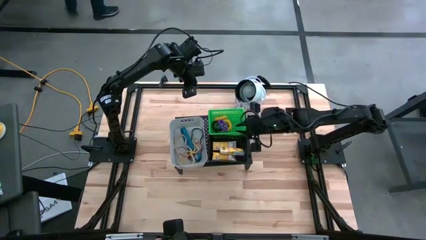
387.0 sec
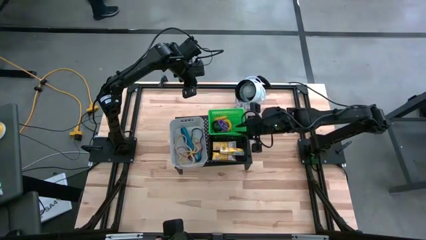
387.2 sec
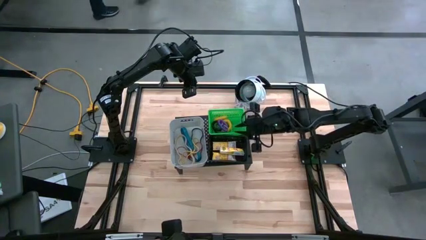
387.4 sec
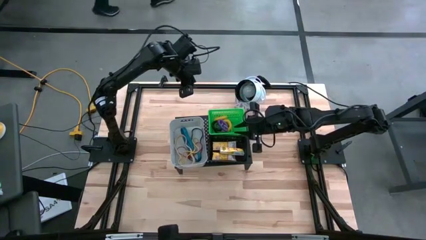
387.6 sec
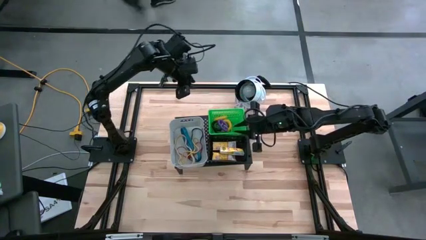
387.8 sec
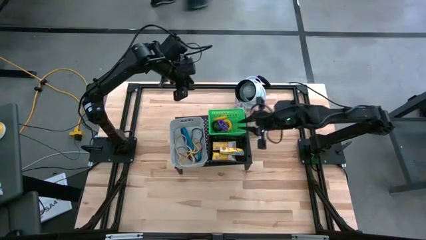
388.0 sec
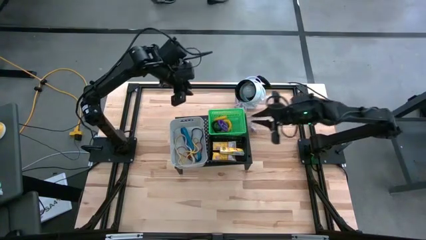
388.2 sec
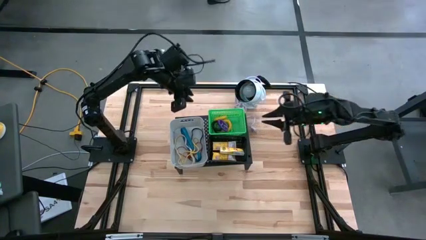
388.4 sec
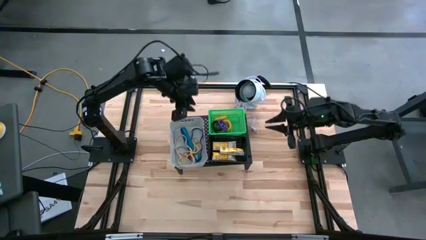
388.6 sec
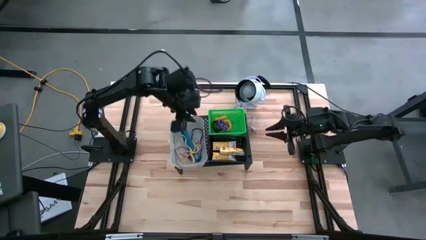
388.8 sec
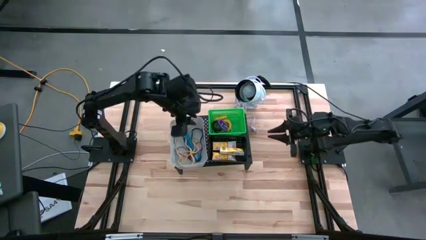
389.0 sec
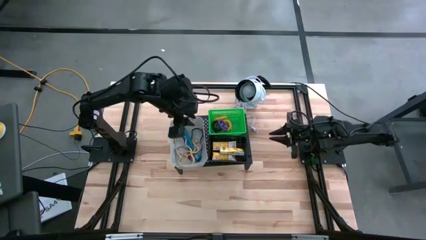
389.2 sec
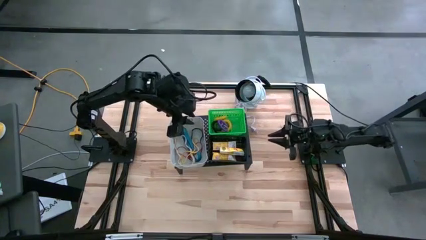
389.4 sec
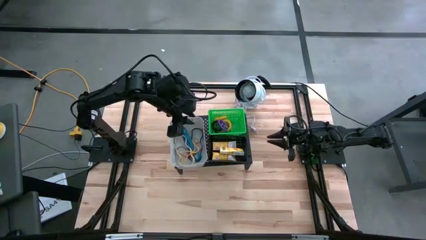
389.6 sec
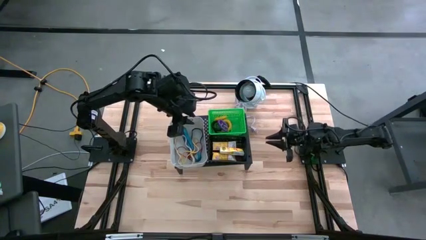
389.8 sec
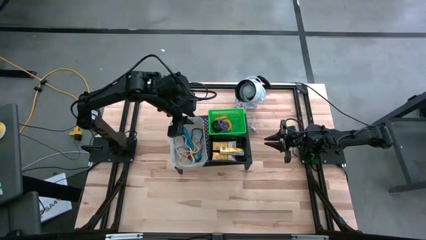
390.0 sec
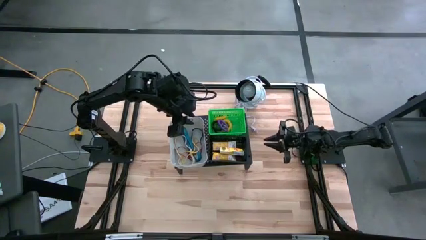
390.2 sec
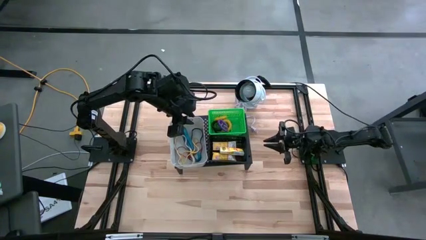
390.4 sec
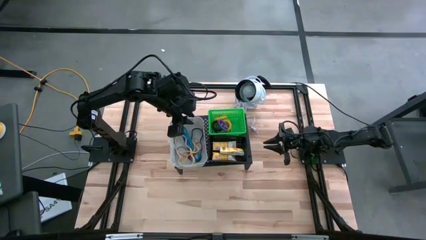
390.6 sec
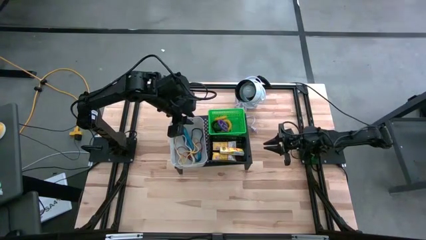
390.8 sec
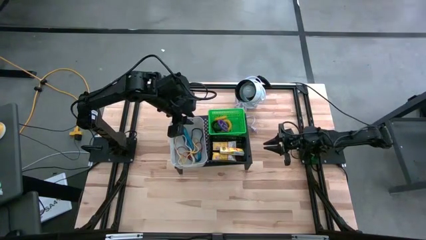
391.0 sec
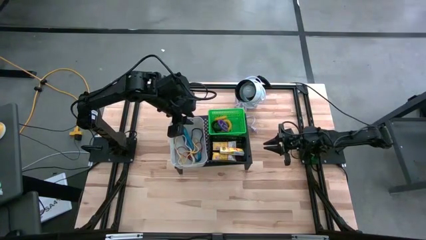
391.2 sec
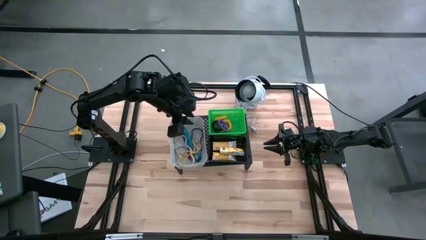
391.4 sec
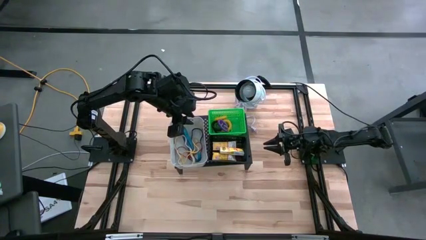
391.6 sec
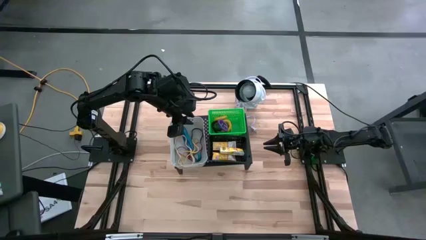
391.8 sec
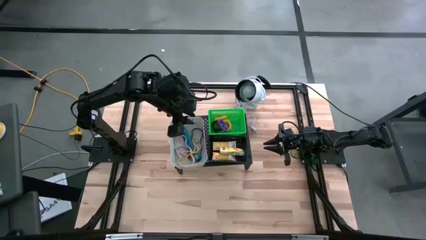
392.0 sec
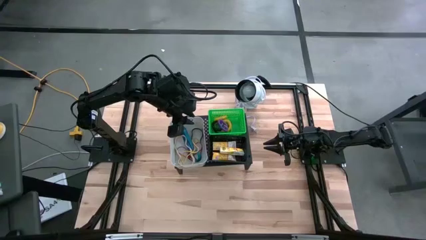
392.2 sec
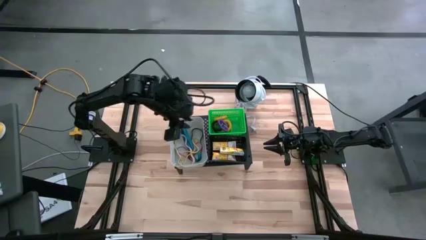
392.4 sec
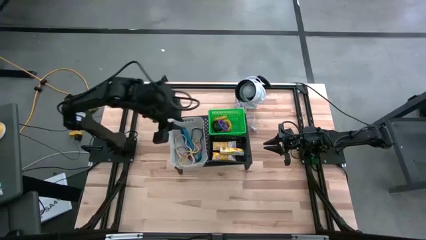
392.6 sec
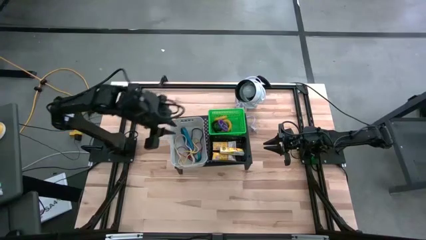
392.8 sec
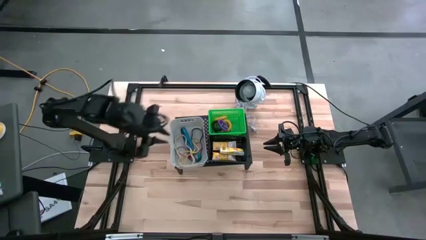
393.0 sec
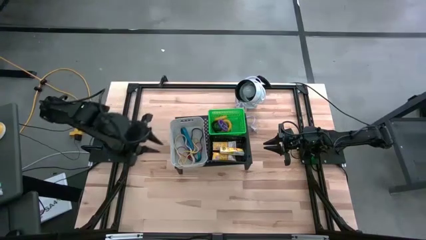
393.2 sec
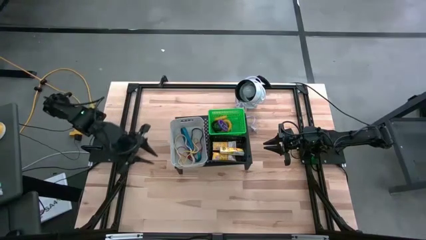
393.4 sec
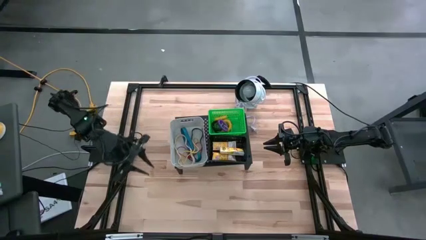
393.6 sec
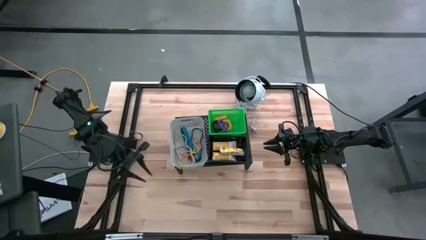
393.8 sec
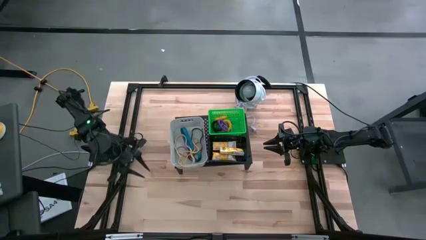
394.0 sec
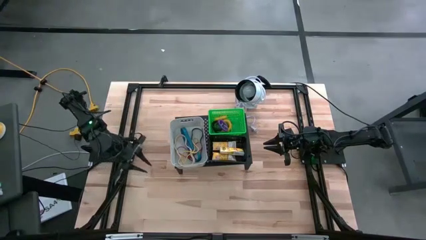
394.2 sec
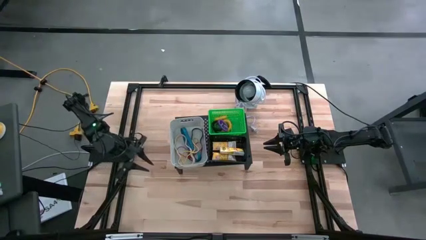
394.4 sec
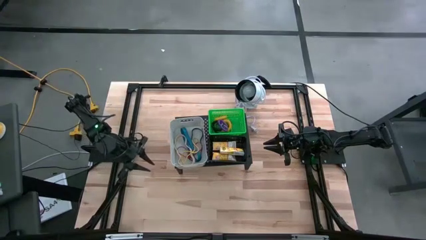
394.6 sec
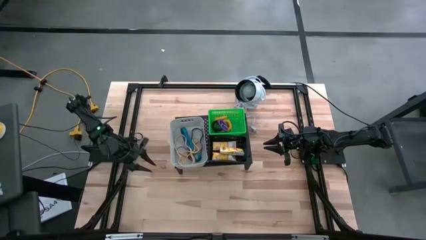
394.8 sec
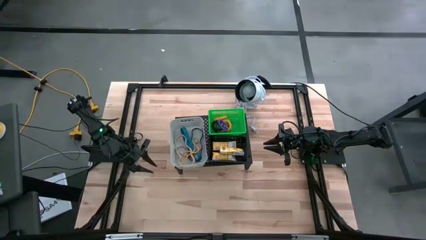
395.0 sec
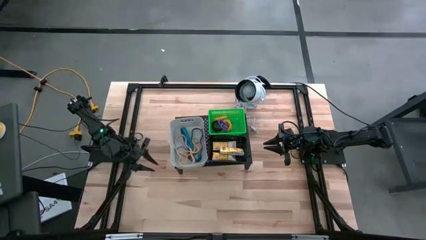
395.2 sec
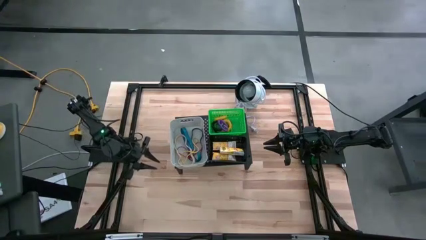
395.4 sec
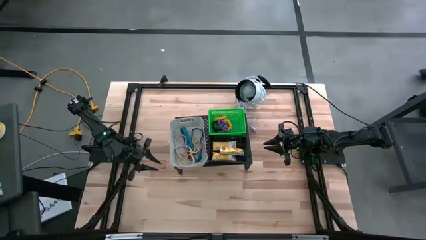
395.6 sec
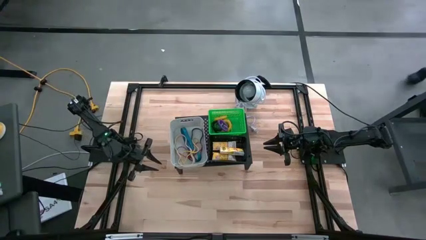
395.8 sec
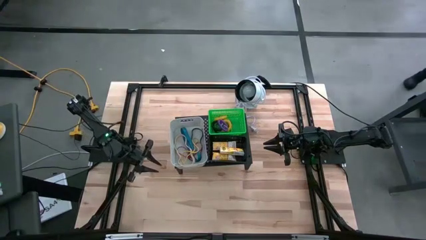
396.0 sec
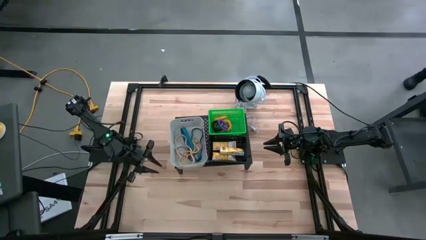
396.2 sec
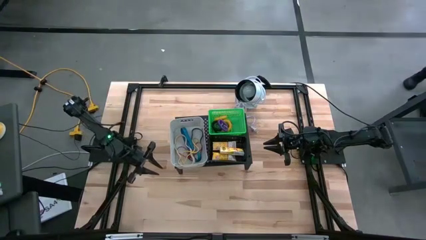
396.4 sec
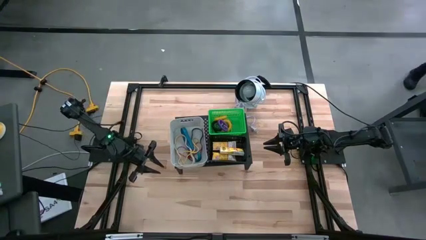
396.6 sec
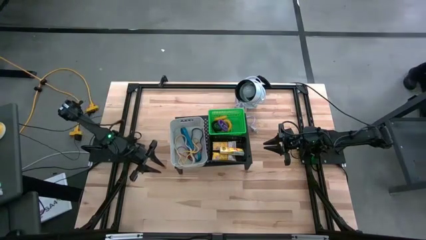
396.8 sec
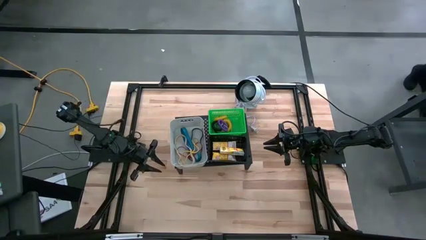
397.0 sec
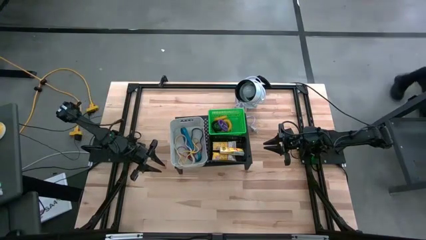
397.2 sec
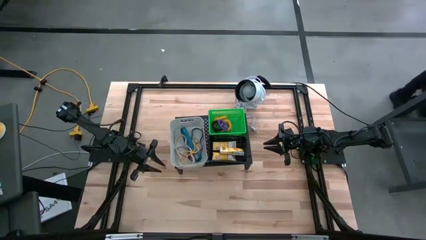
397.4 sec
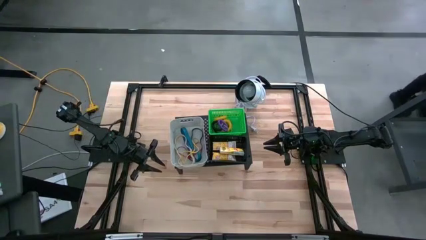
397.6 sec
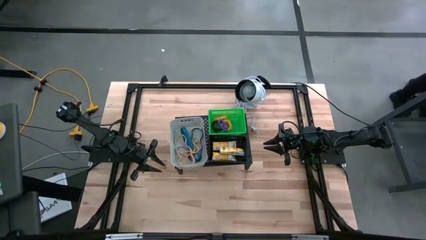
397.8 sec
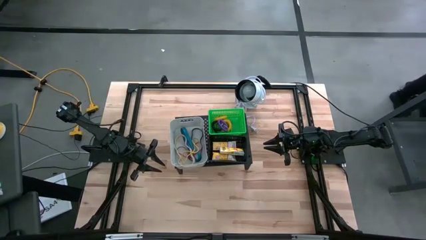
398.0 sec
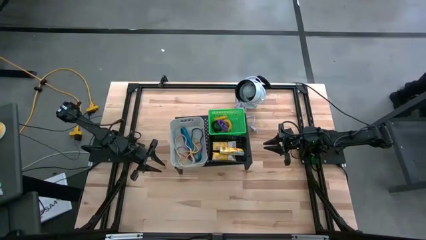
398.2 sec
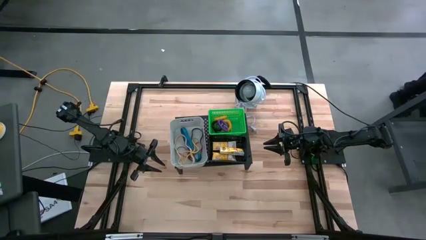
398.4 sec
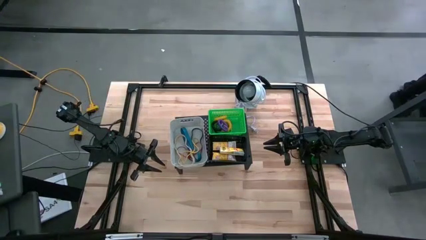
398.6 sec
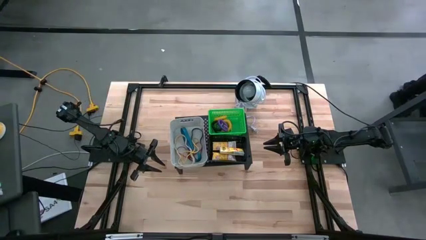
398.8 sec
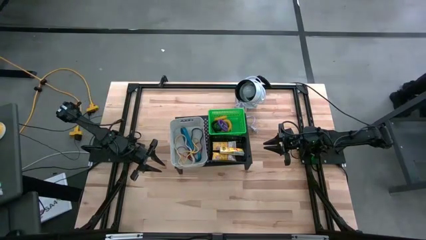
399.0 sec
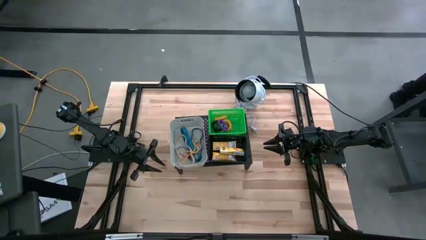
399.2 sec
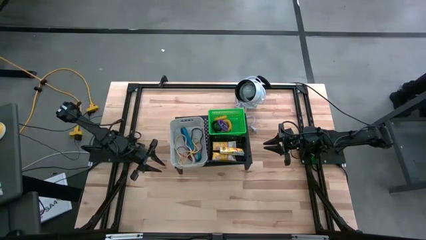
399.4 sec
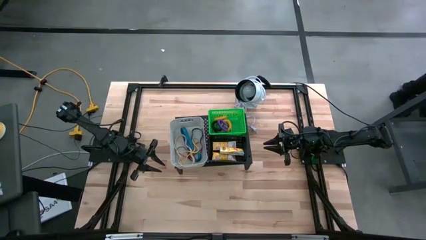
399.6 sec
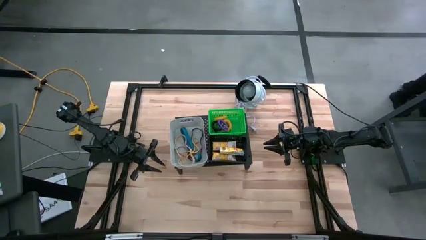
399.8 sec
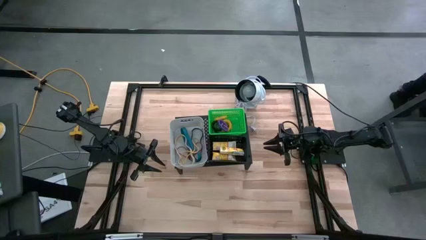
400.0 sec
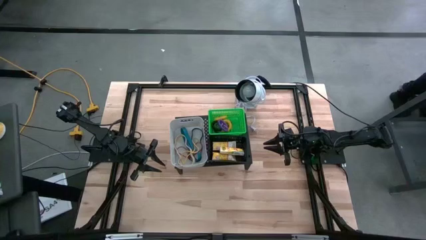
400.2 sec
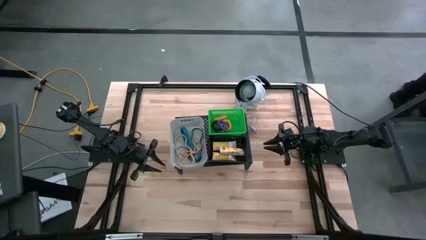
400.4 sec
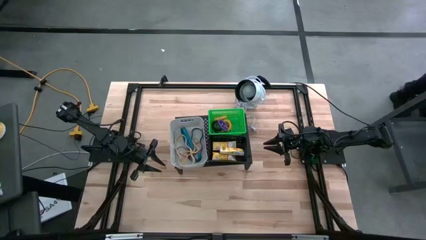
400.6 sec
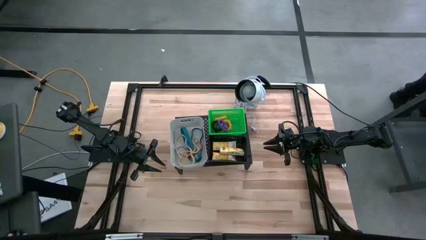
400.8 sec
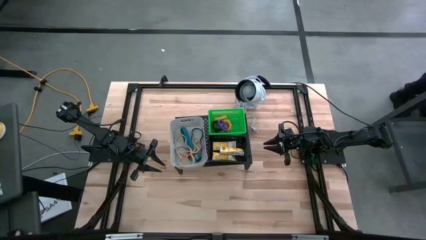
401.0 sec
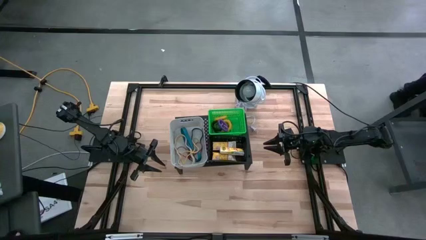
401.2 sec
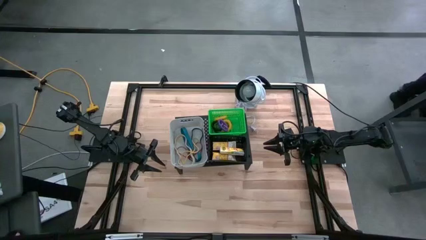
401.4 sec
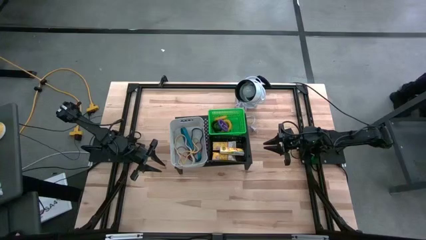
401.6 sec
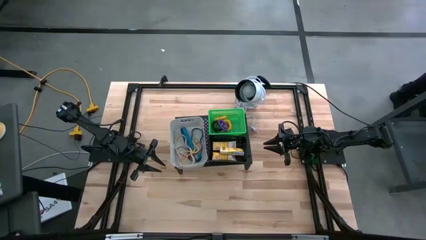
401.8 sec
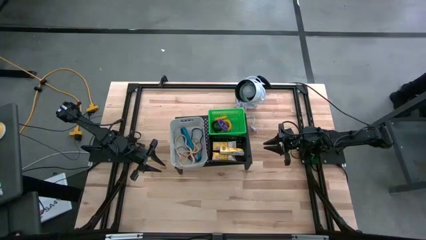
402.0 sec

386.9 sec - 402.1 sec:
Task: Pick & Place Office Desk Supplies
Return to Home Position

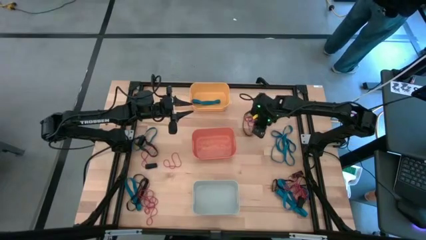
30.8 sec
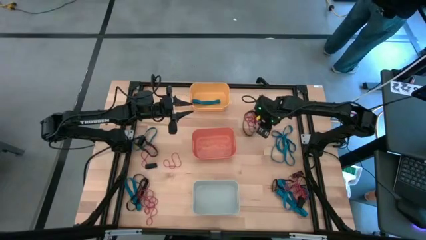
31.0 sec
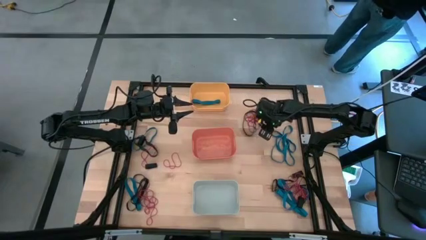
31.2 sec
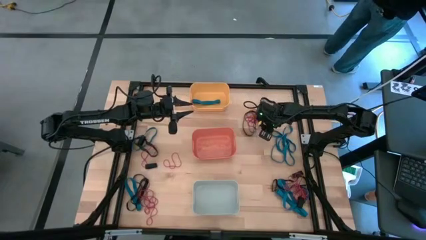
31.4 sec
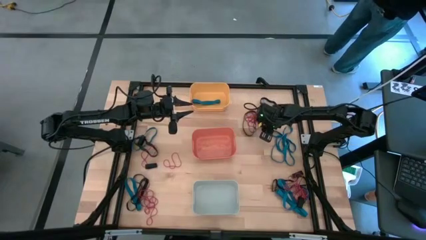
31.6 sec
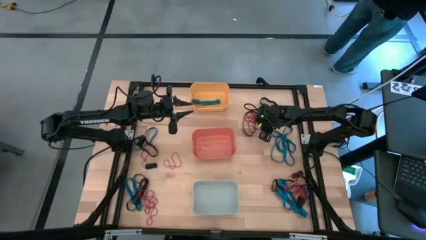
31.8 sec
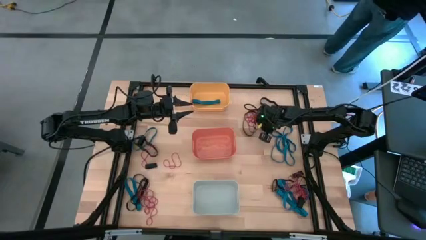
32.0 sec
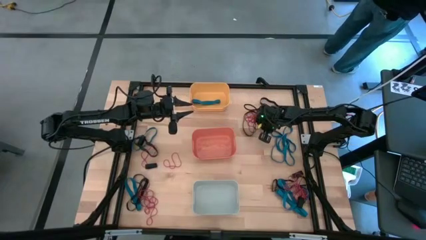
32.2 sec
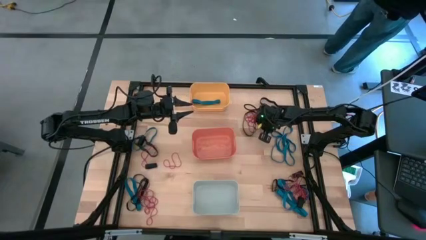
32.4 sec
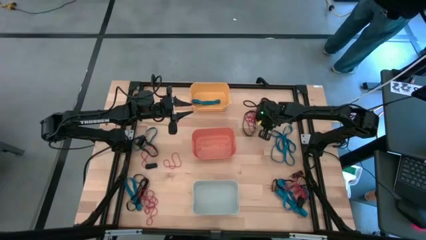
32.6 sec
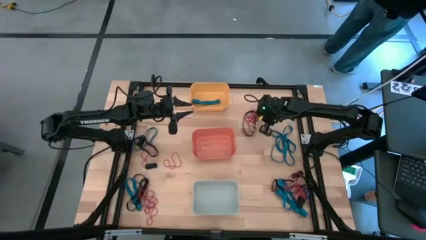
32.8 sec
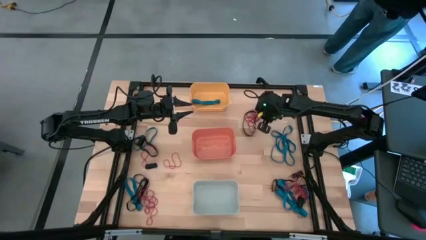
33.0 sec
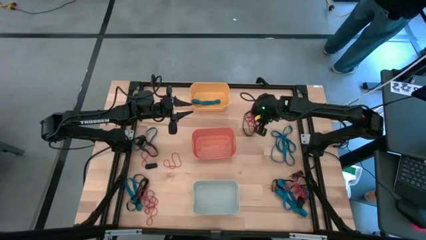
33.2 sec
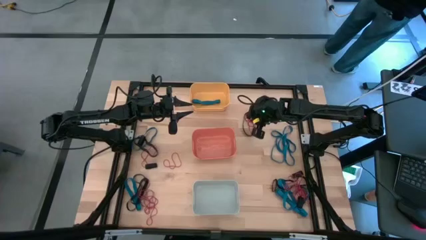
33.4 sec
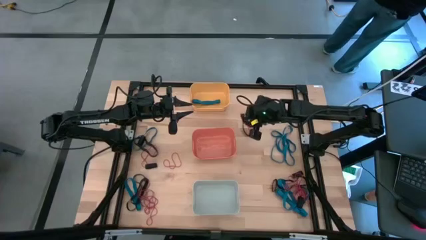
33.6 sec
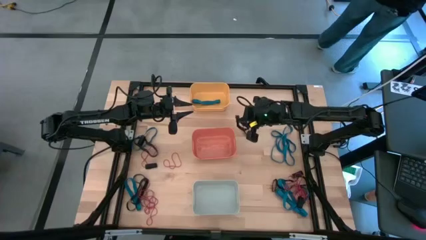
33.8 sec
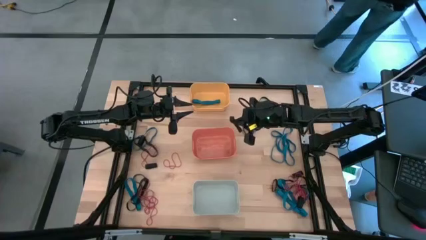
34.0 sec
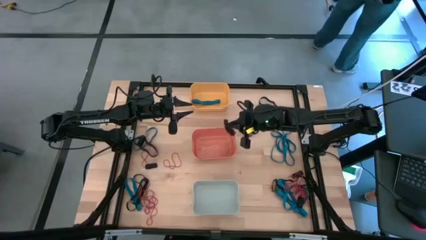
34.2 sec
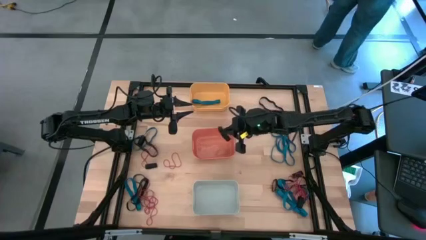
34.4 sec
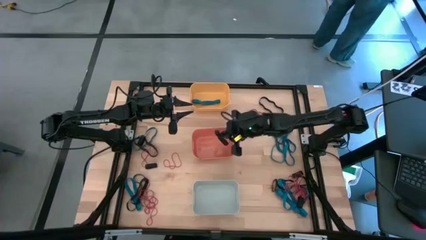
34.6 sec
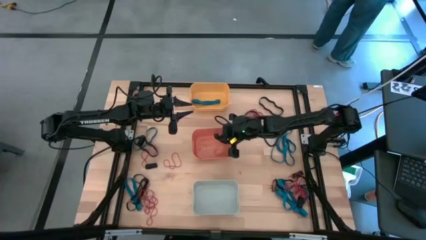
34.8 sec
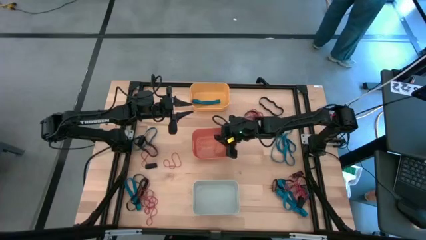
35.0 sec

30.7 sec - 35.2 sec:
Task: Sort rubber bands into baskets
Put the black rubber band in the orange bin
